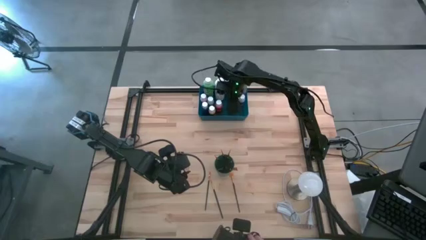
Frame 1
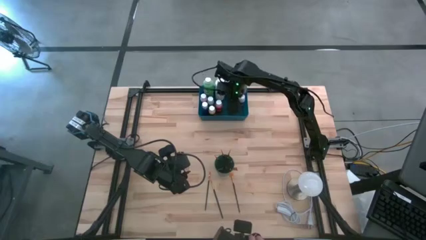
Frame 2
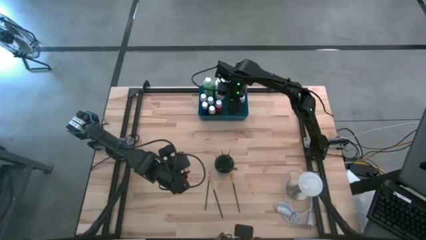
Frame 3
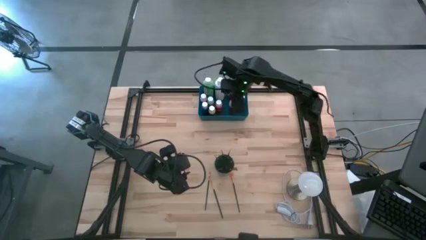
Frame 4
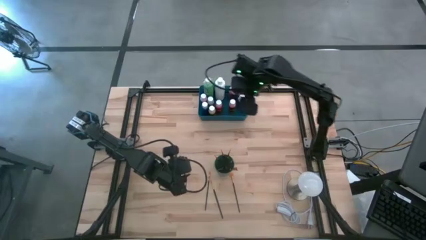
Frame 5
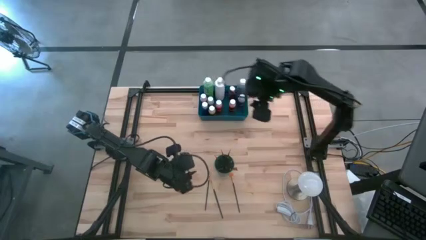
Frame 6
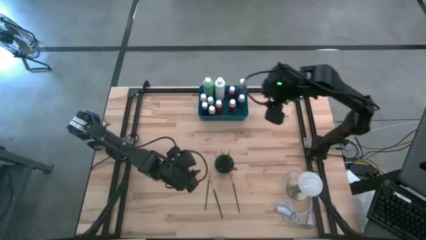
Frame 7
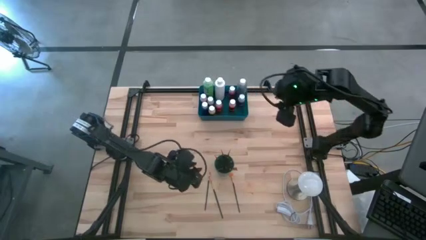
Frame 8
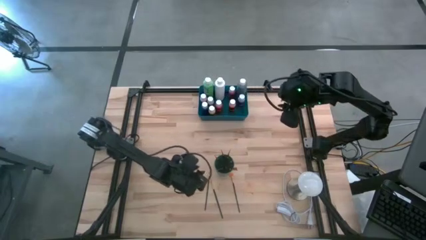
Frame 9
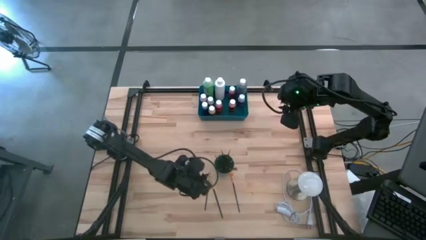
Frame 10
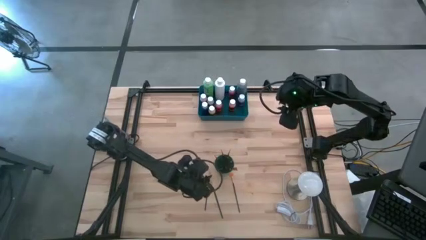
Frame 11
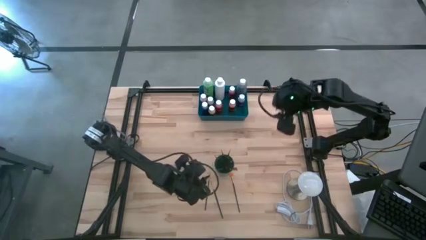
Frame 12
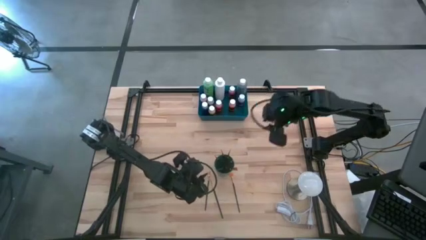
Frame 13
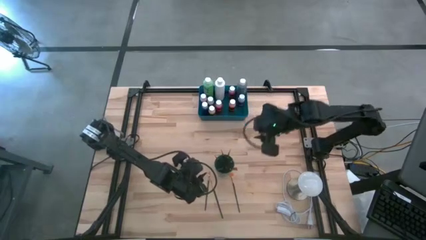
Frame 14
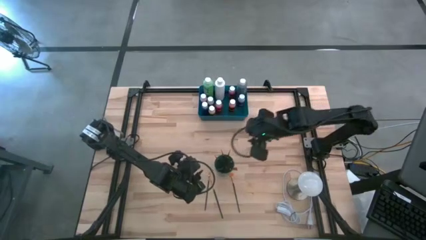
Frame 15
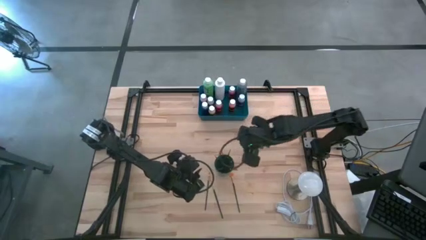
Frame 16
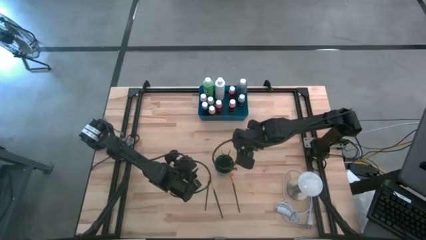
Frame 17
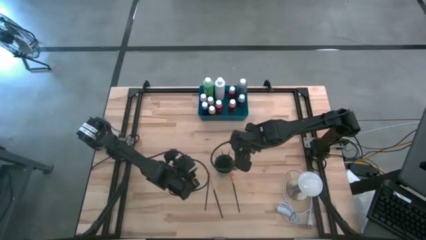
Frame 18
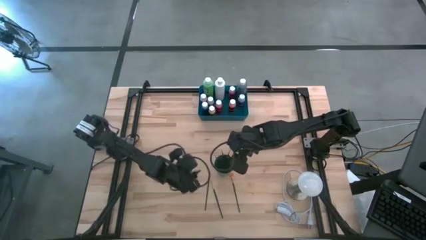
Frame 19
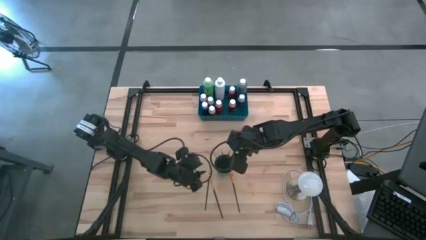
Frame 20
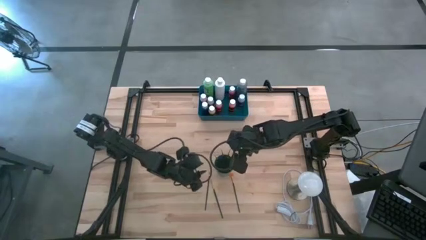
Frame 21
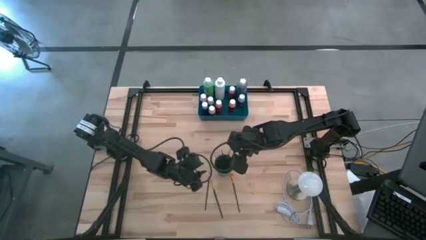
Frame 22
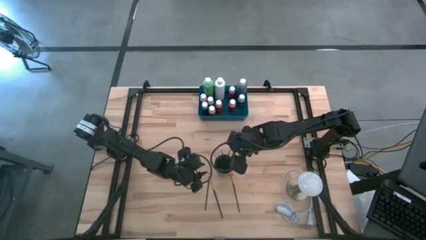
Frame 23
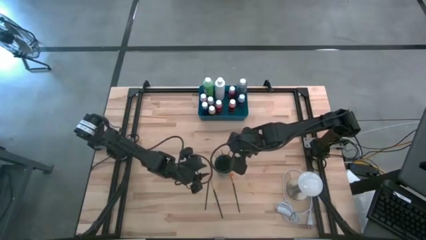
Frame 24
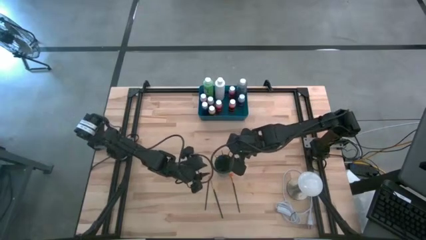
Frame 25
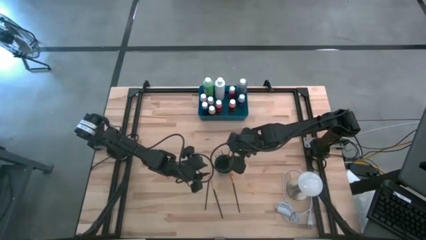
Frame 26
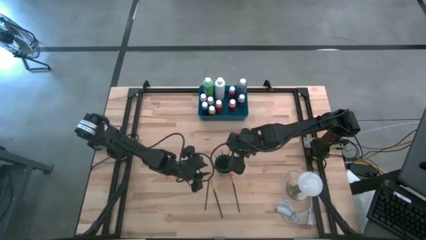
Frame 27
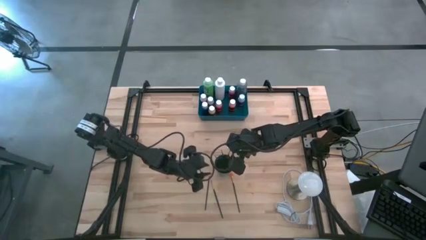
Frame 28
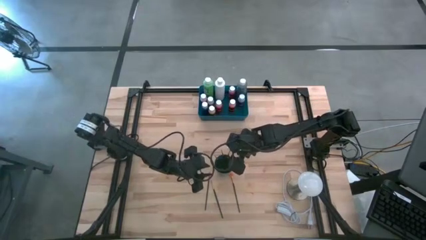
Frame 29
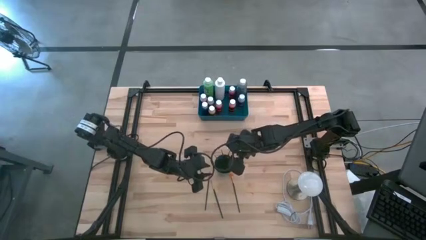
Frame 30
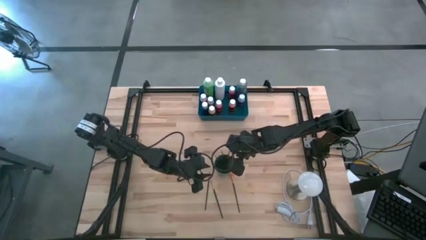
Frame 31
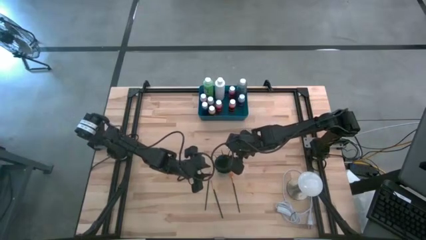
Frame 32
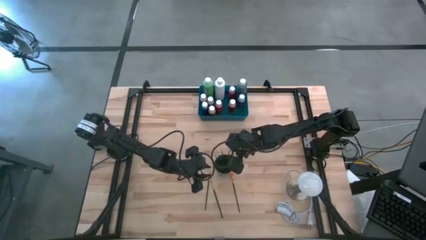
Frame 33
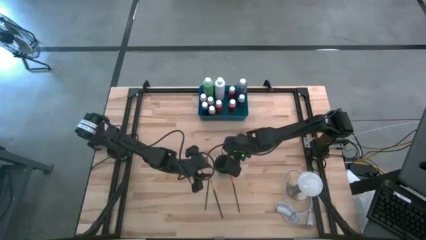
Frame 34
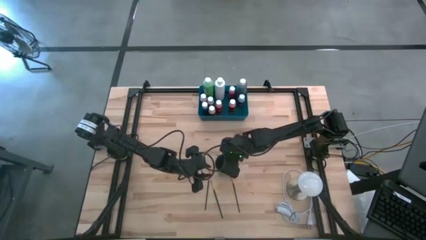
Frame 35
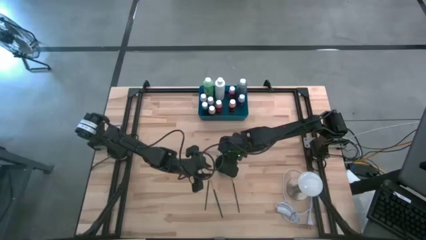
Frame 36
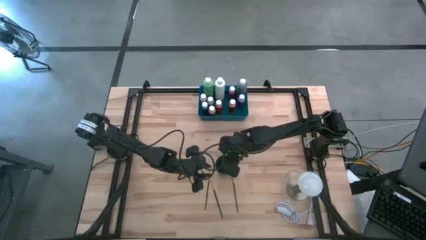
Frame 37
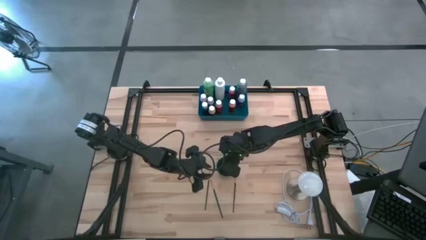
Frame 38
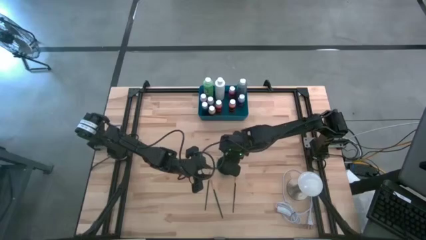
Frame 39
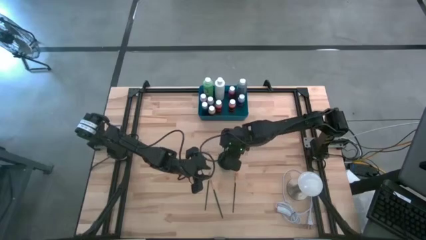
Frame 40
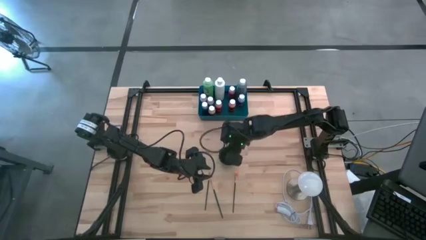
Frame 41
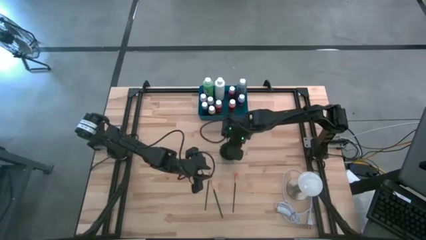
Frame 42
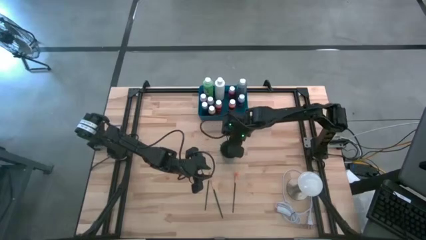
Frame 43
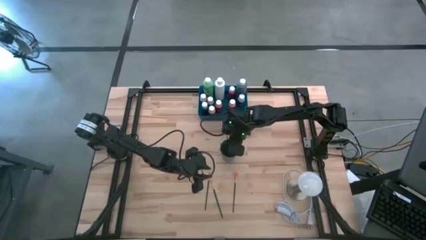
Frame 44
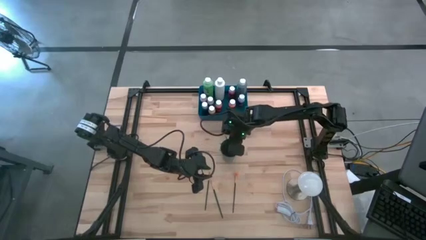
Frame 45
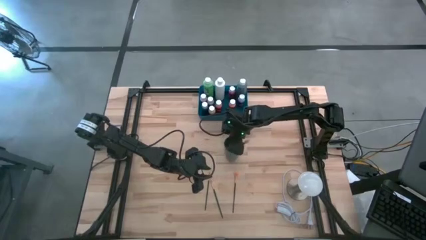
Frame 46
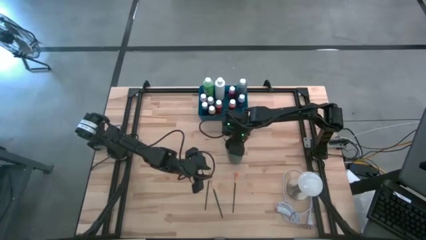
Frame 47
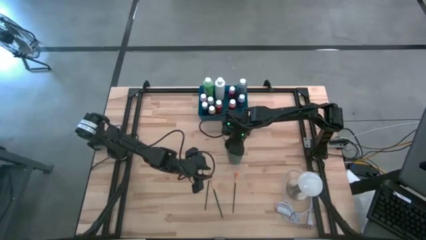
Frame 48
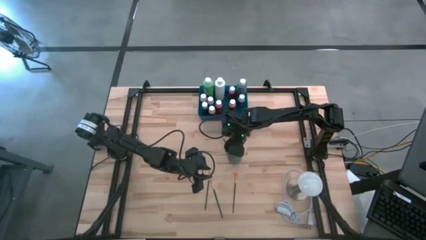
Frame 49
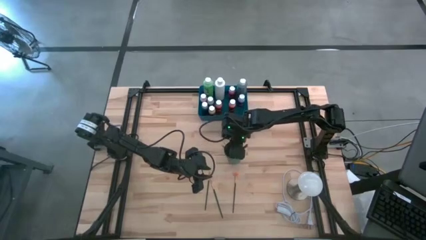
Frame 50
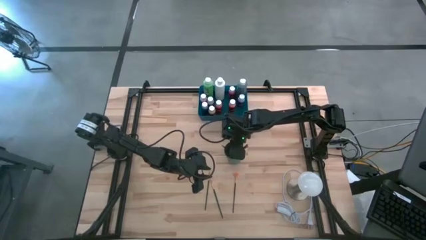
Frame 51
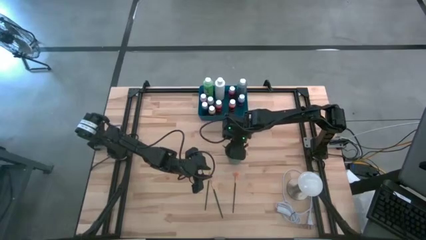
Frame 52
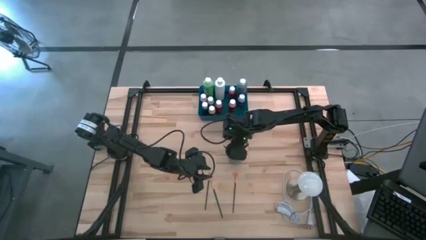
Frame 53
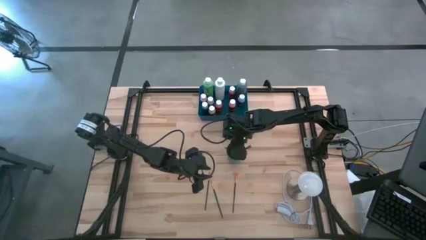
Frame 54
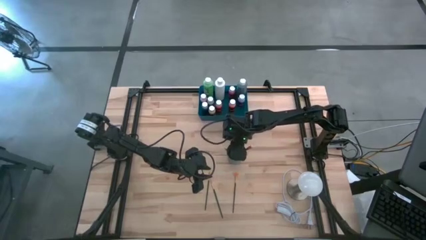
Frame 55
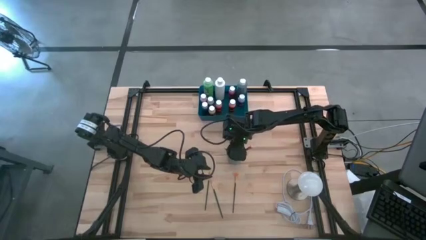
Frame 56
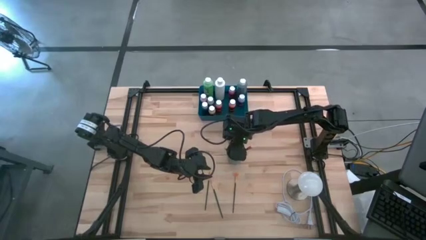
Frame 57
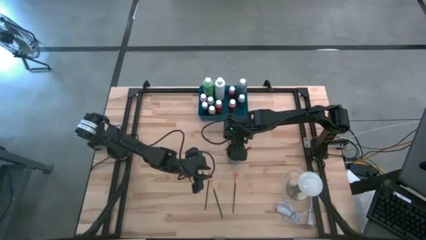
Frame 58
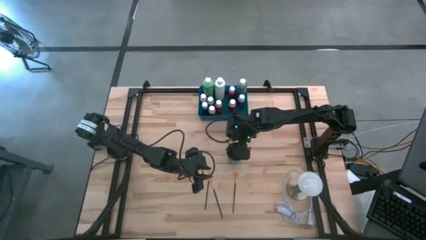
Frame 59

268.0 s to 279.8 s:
Task: Pick & Place Paint Supplies
Adjust the green cup
